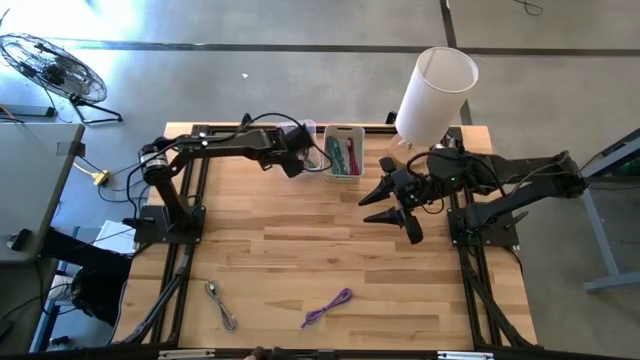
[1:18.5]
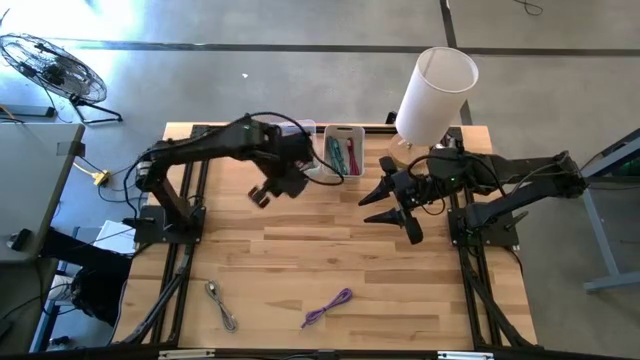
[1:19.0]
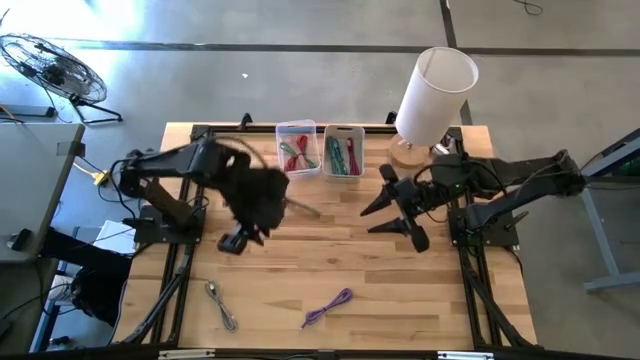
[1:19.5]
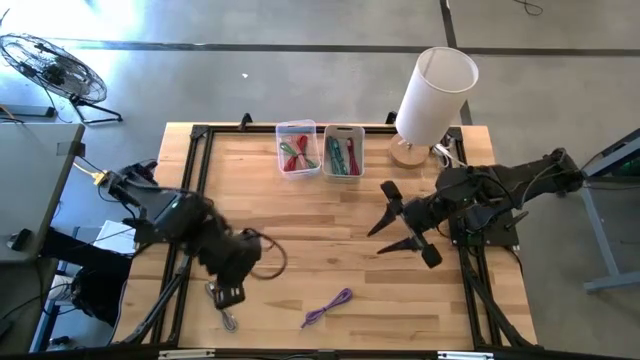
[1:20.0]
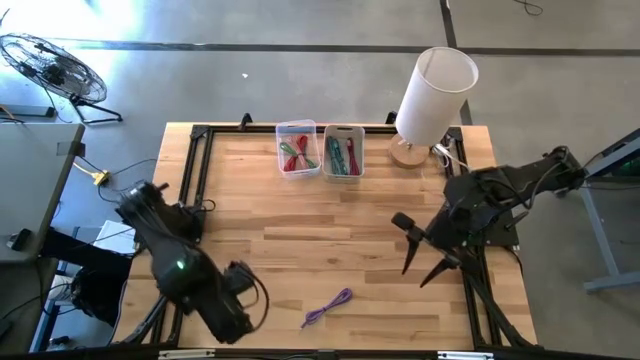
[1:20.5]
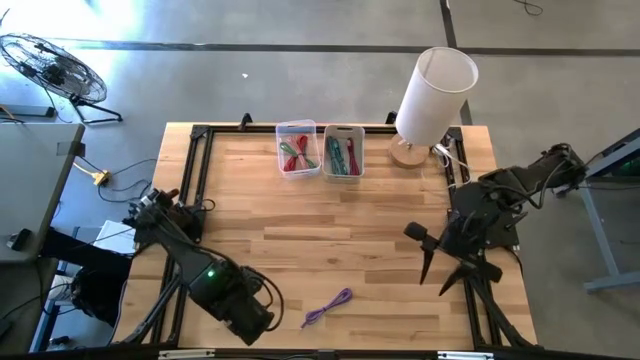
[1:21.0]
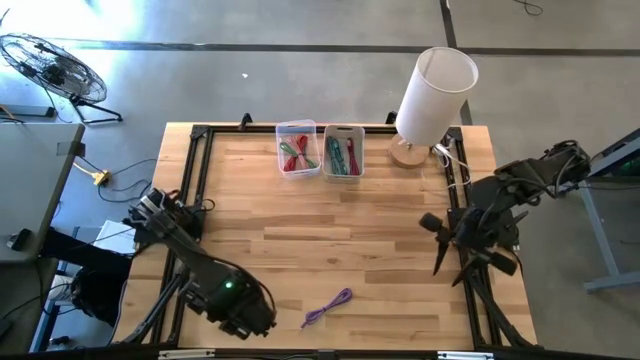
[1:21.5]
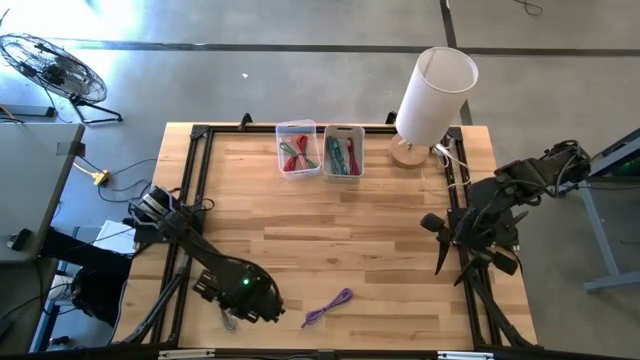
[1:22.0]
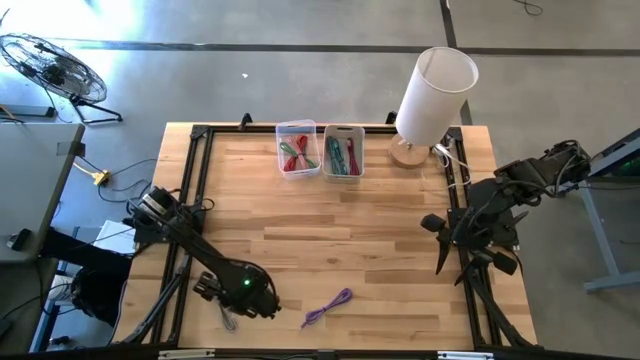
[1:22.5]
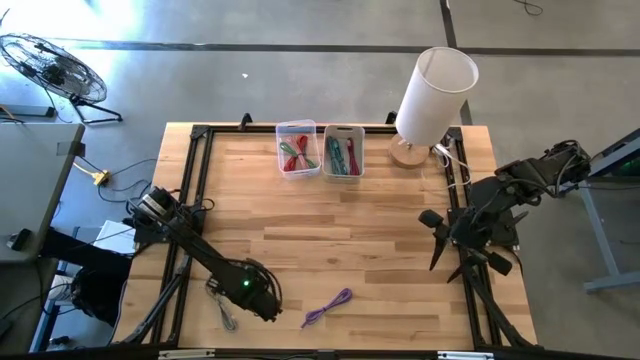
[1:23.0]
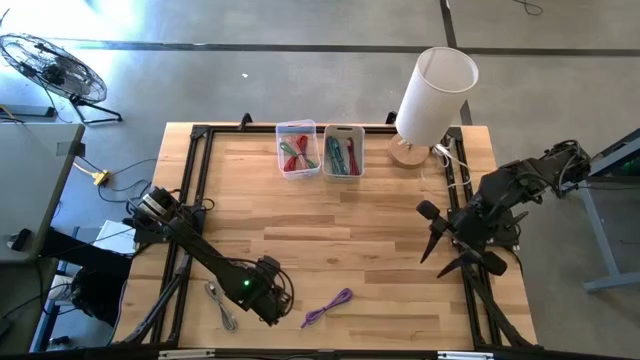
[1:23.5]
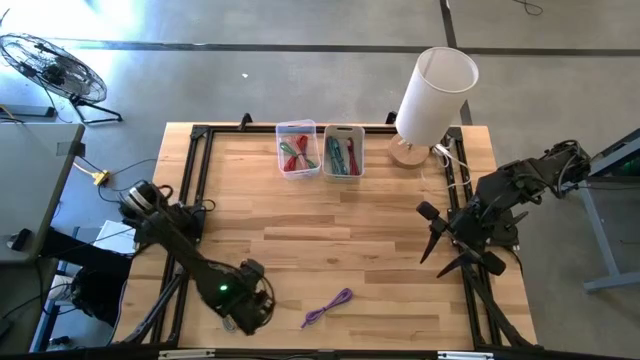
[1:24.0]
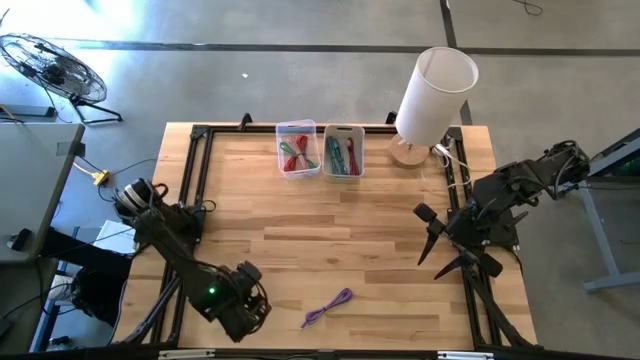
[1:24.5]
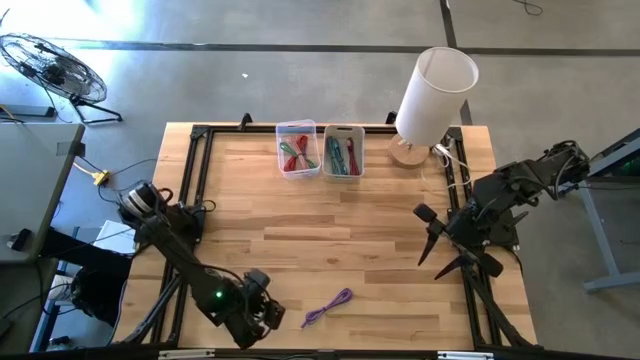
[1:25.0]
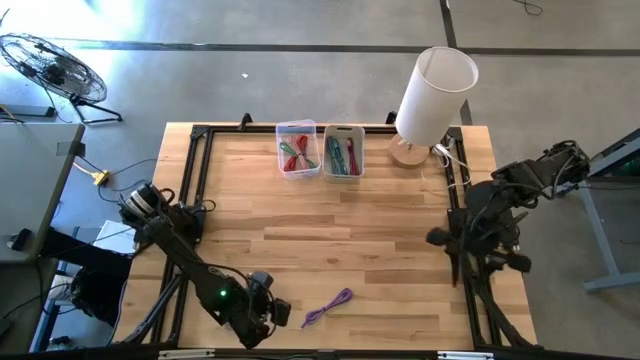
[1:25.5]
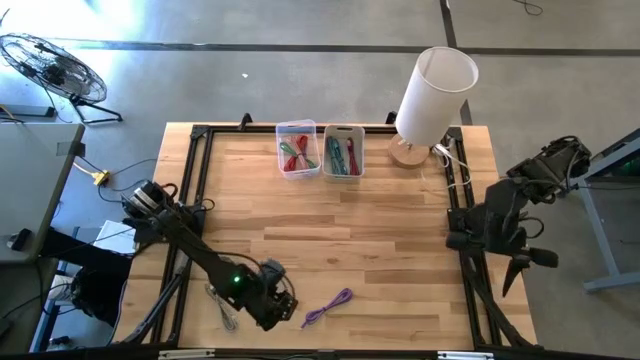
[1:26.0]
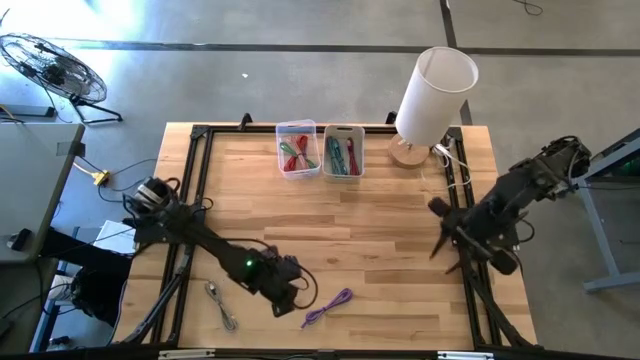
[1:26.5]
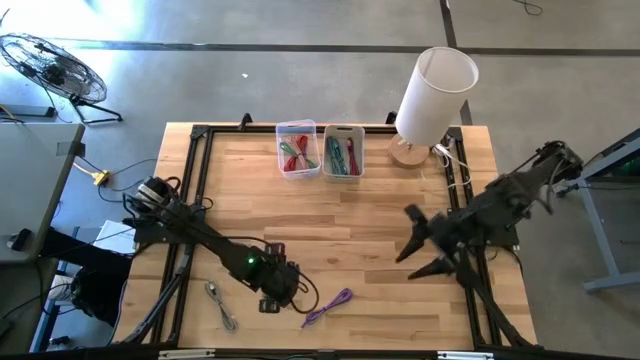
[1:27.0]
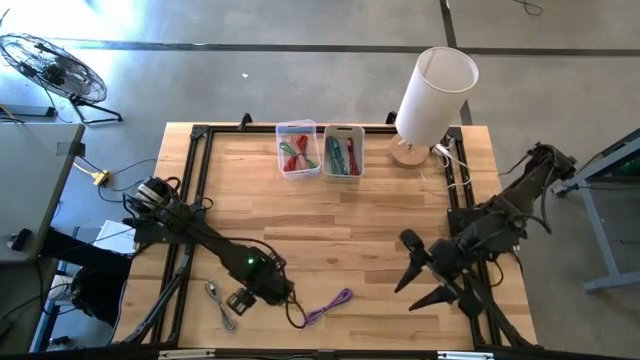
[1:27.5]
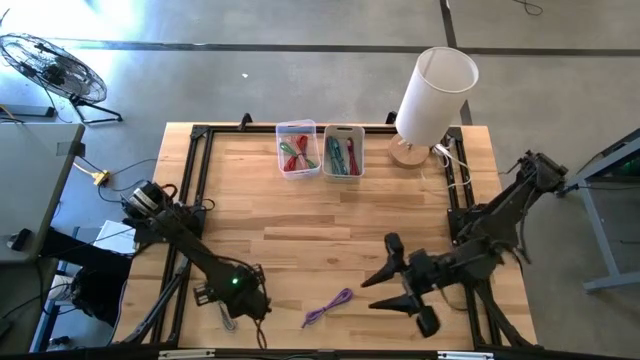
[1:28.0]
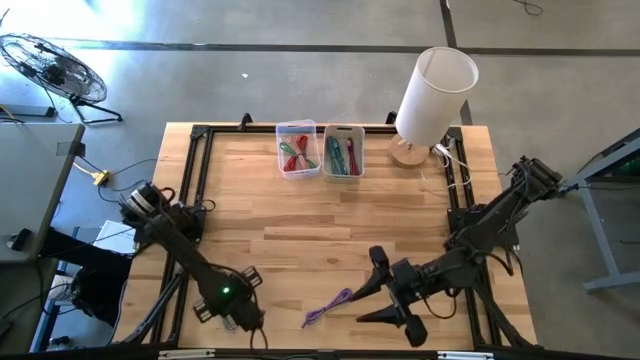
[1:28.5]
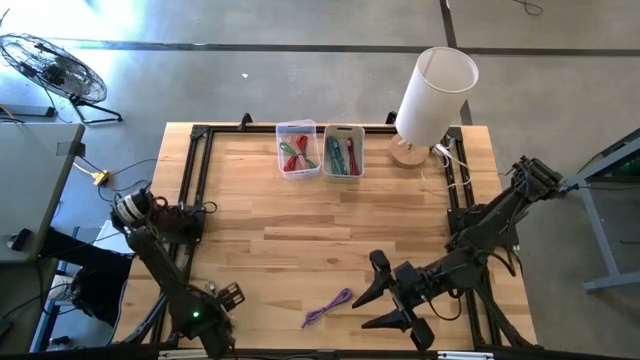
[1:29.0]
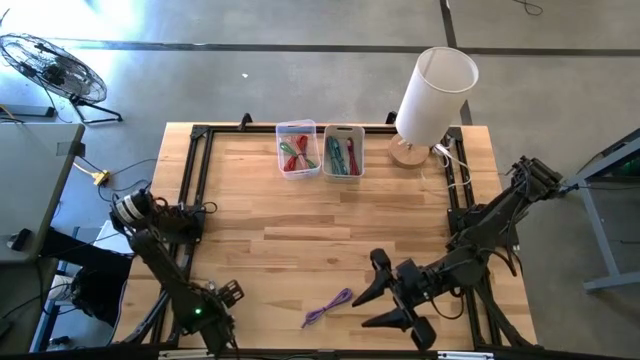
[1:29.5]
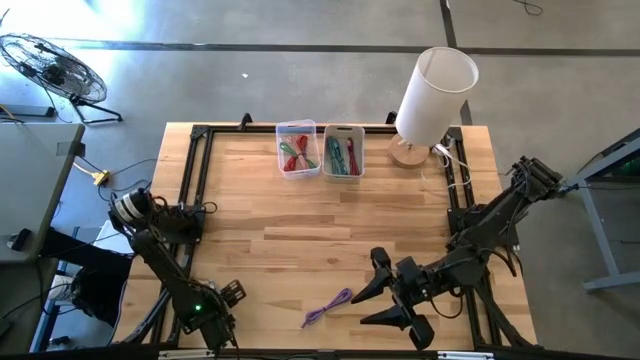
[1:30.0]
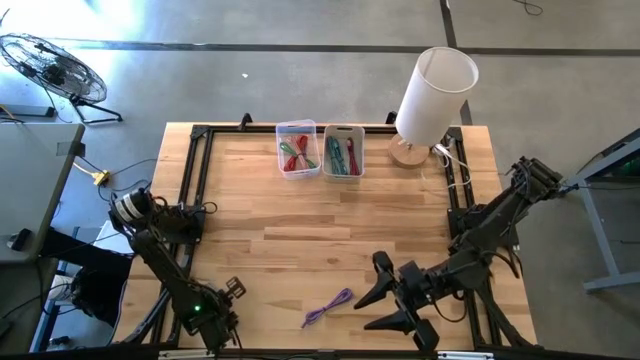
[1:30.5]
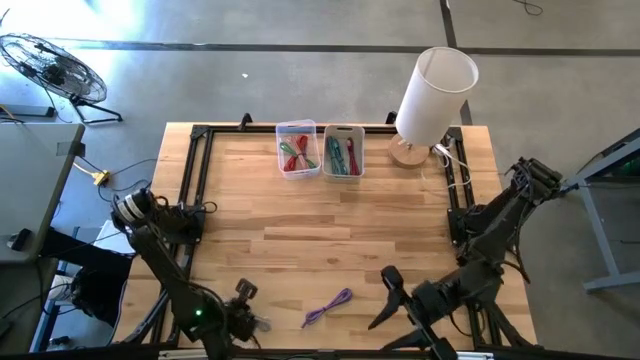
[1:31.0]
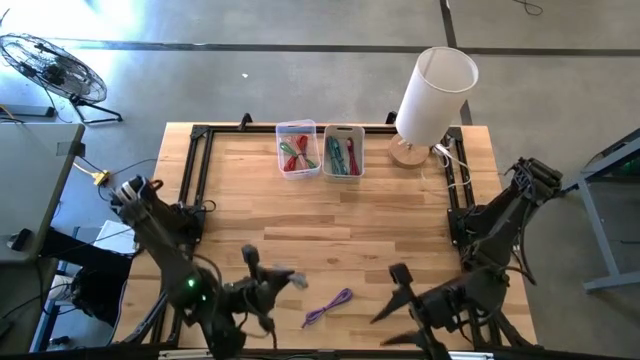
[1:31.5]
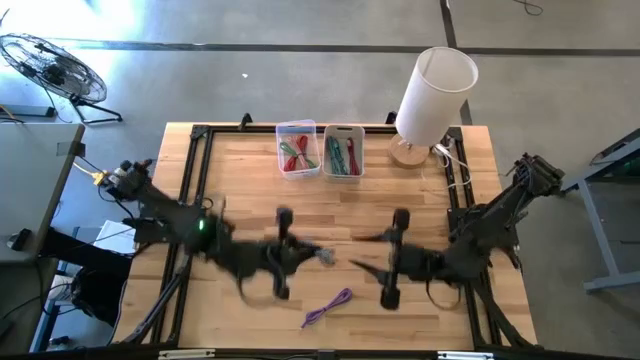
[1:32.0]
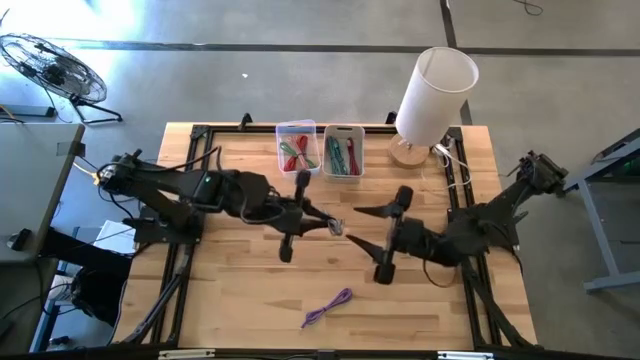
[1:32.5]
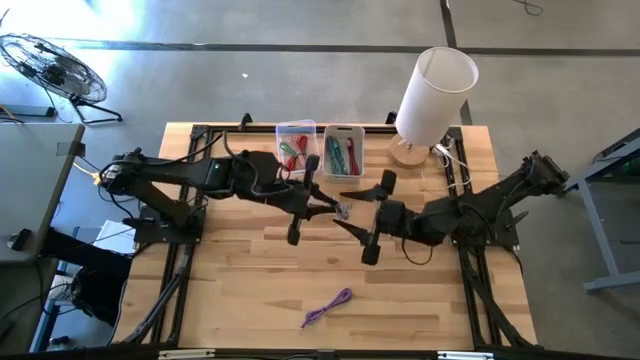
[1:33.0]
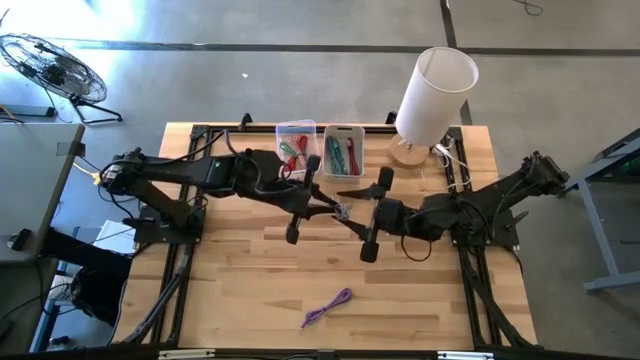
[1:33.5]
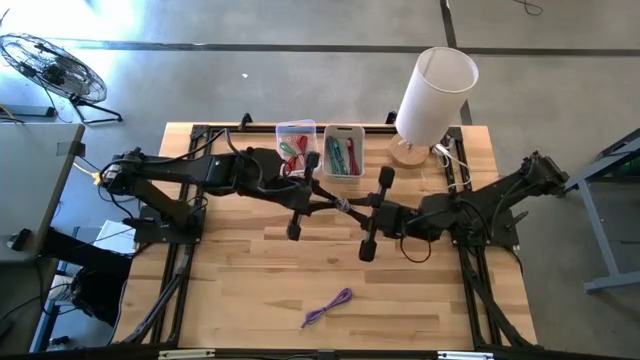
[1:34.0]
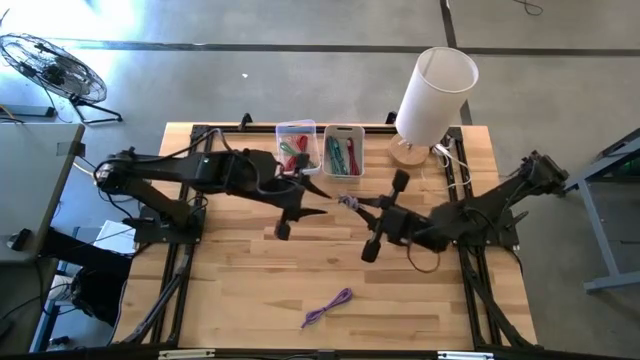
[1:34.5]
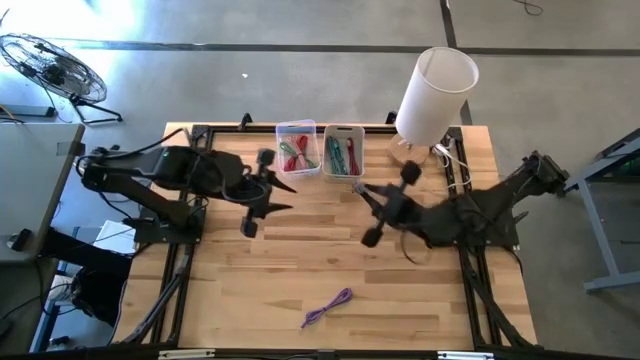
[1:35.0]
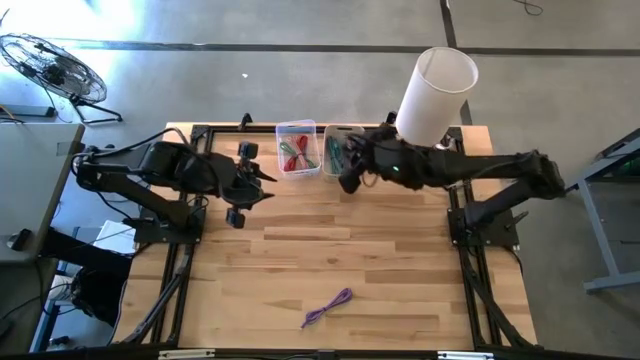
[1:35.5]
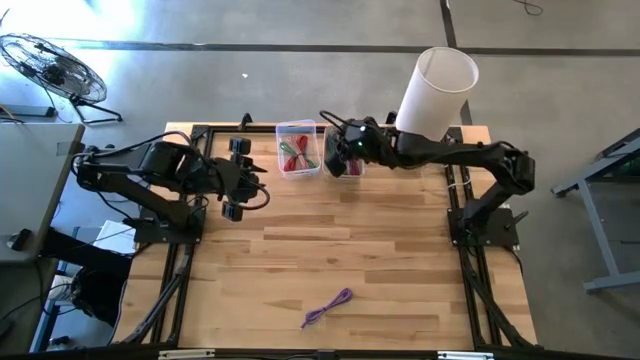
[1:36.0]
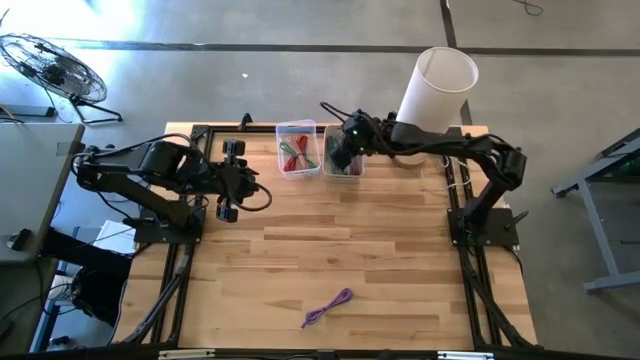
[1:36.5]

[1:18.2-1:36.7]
Task: Pick & Place USB Port
Put the white cable into the gray bin

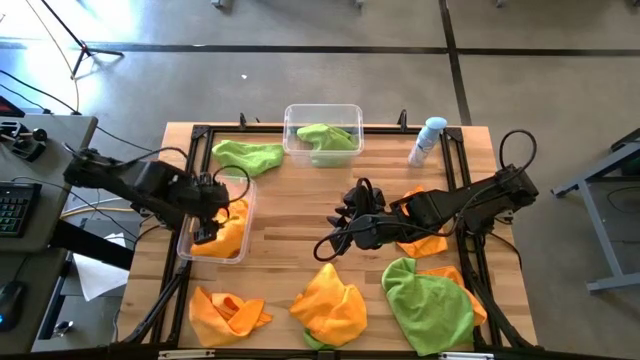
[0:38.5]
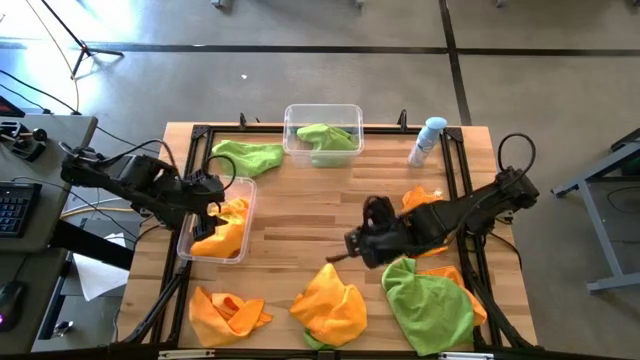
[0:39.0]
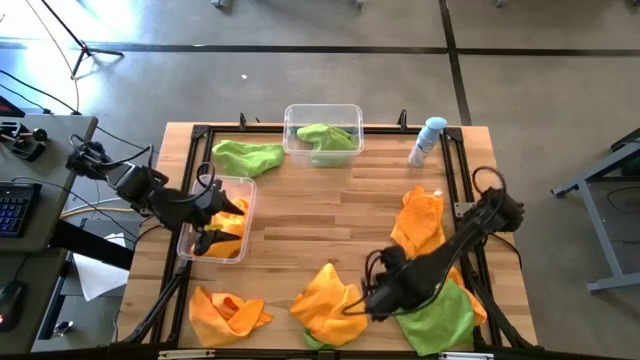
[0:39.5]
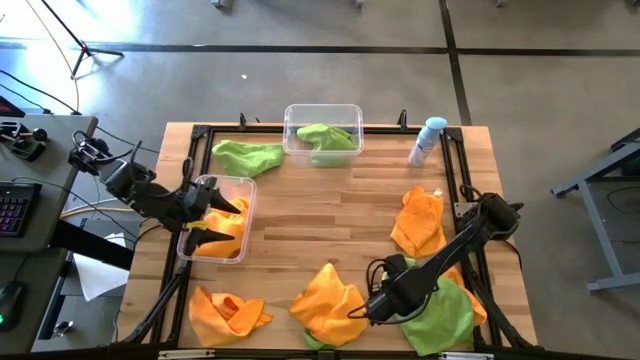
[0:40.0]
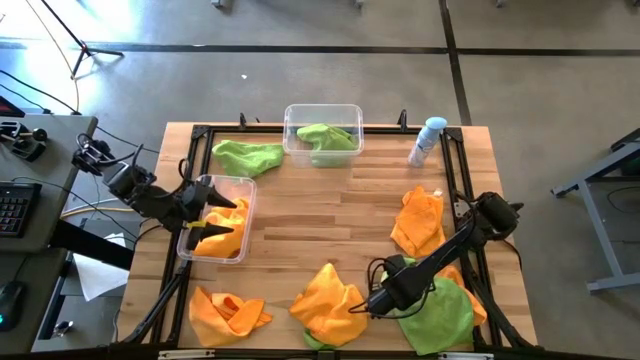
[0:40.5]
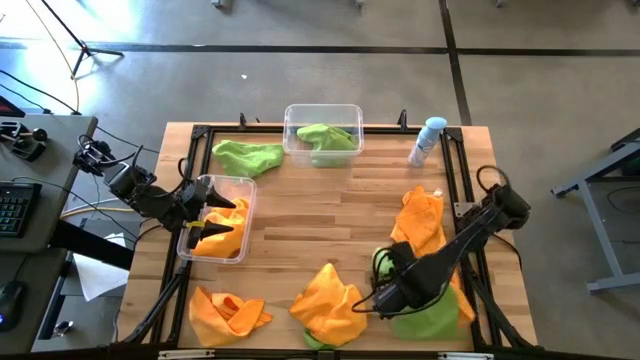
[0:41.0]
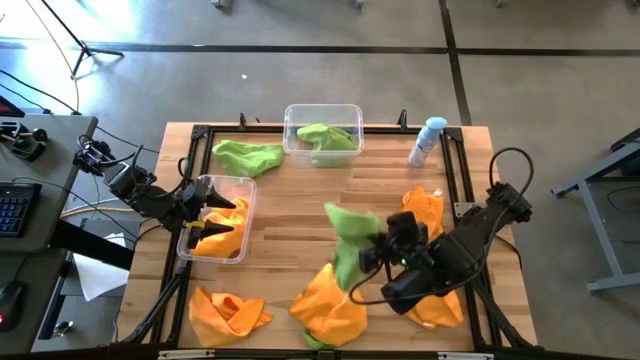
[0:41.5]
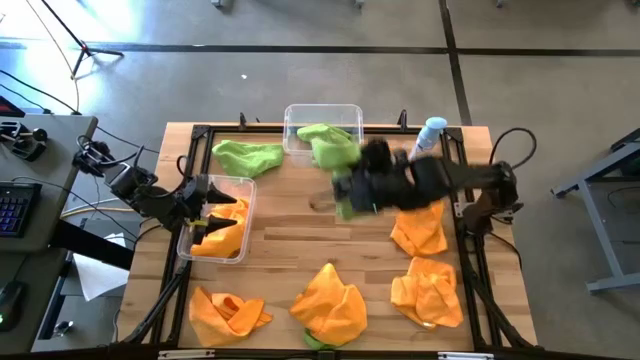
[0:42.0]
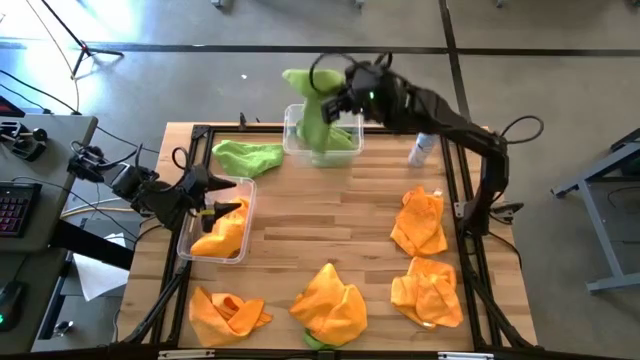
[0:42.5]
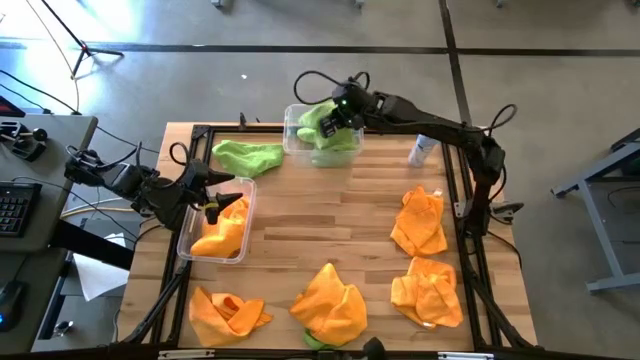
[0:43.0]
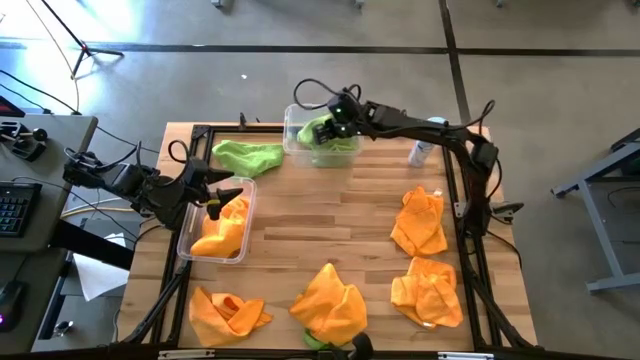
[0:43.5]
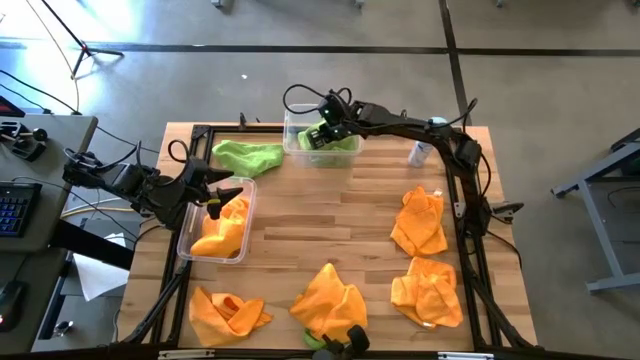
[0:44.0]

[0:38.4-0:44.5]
Task: Sort microfiber towel by color & place in baskets
Put the green microfiber towel into the top transparent bin
